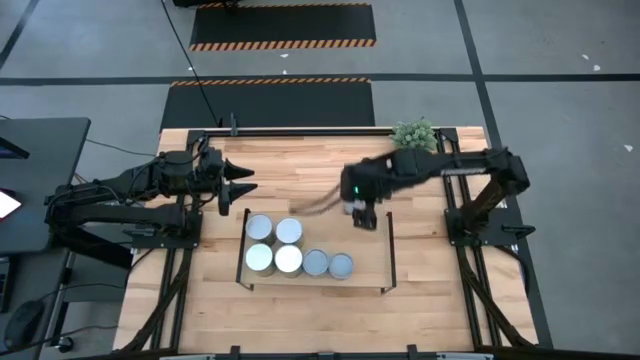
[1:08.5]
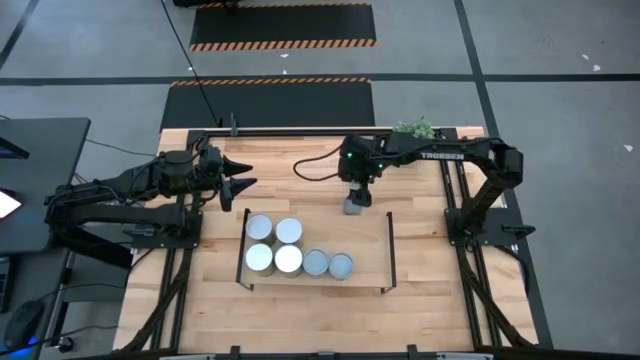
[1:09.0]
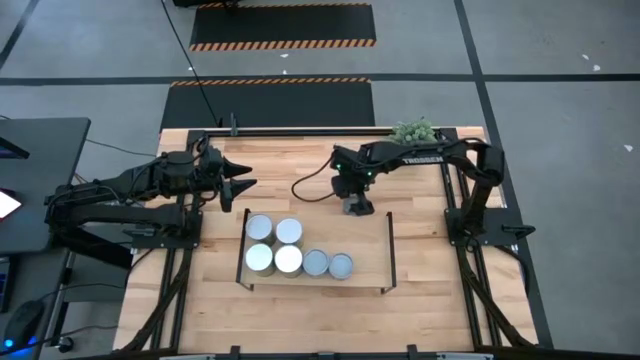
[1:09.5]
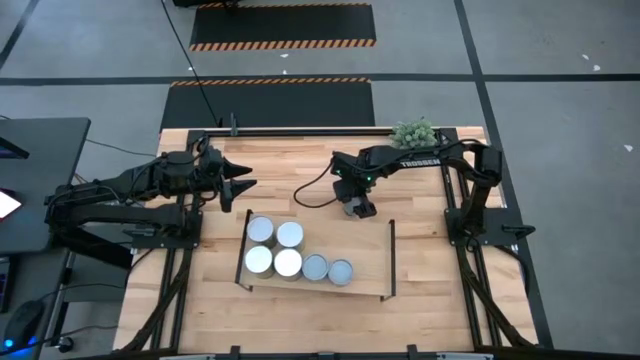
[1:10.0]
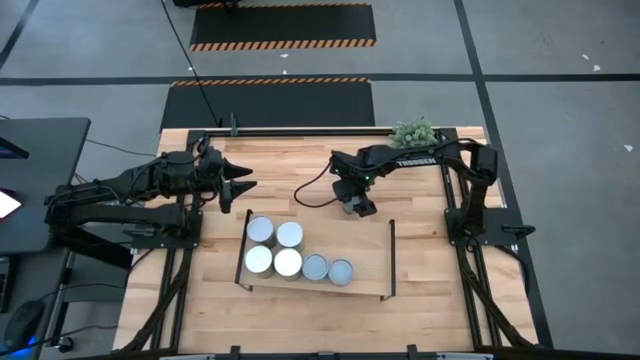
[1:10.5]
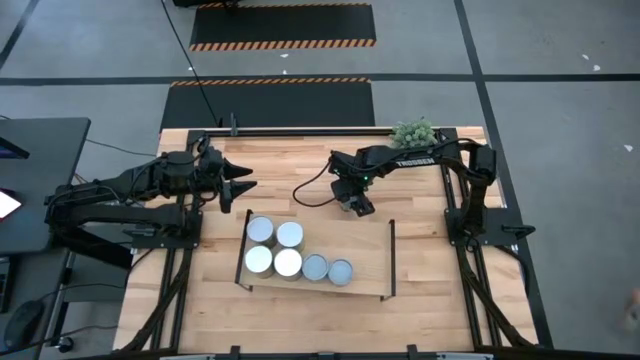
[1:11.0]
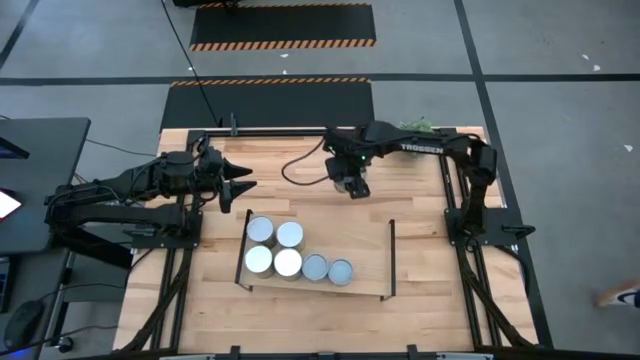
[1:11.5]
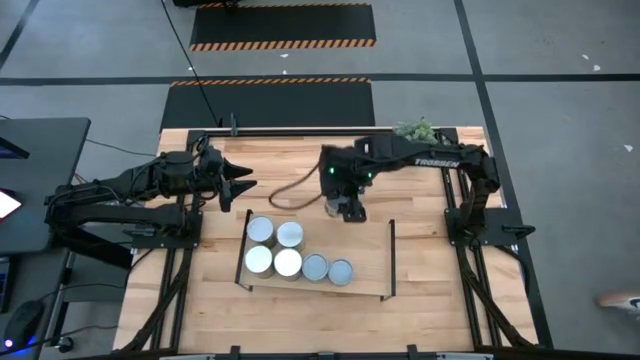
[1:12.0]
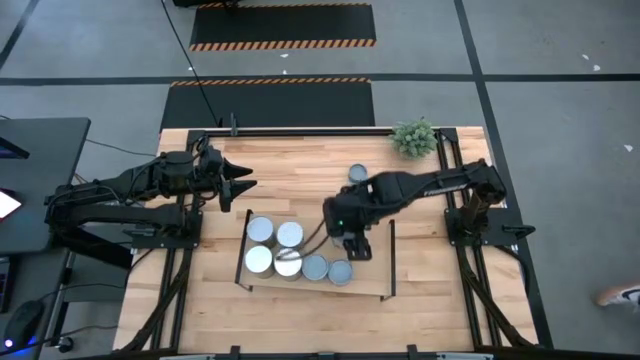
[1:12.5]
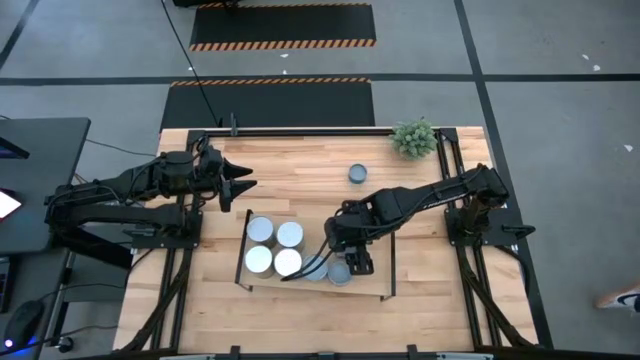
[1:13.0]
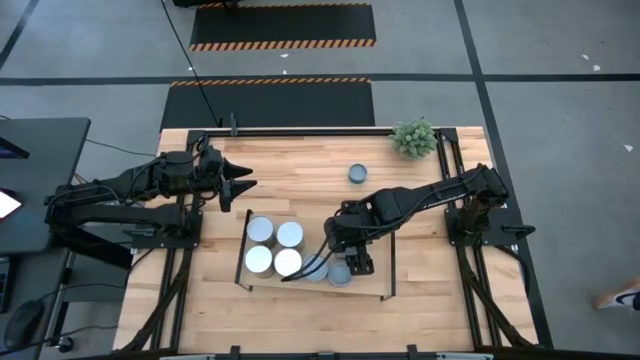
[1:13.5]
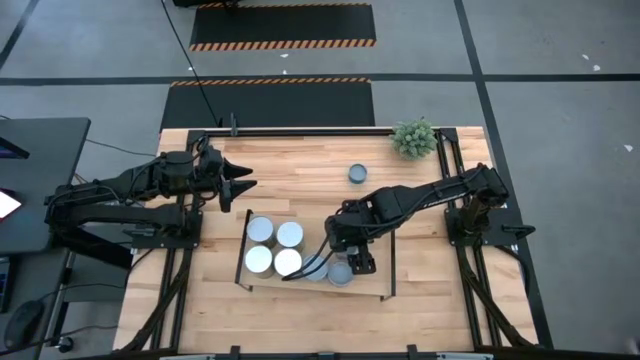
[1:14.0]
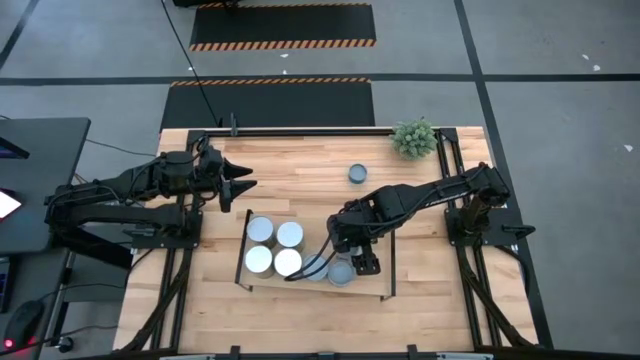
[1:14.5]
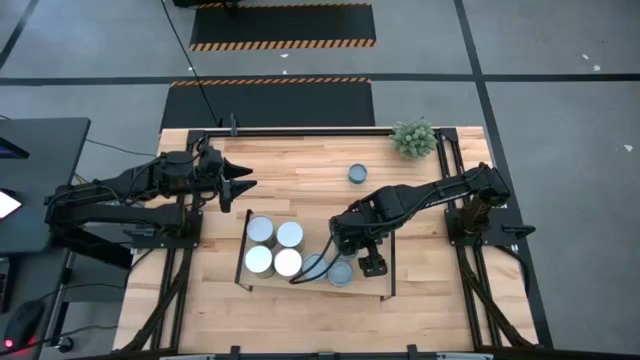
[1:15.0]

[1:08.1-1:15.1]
Task: Pick and place cans onto a shelf
Put the canned peas on the shelf

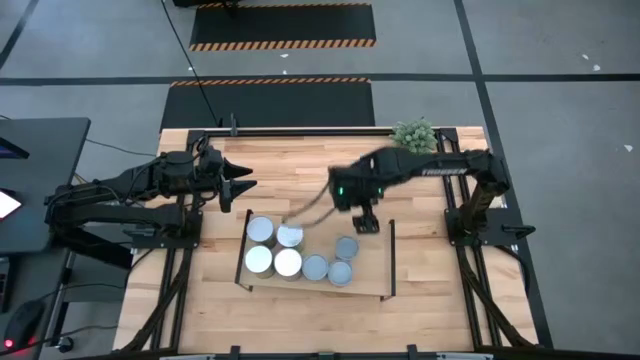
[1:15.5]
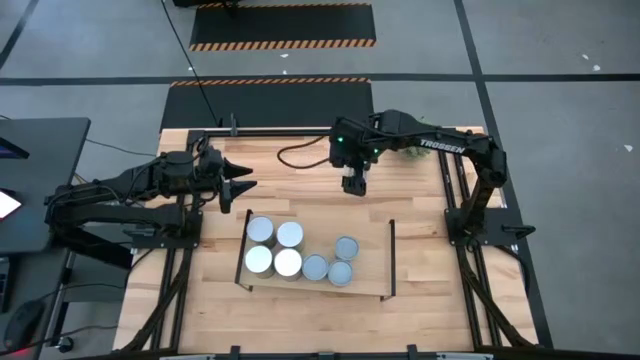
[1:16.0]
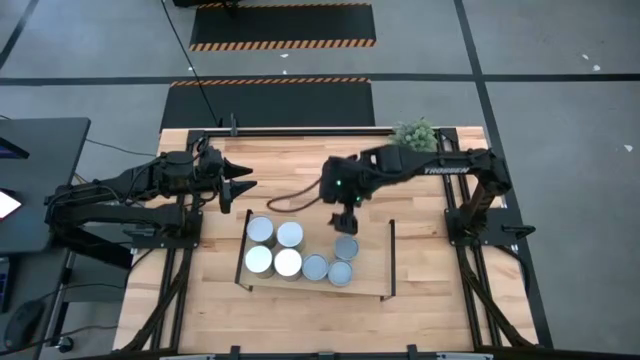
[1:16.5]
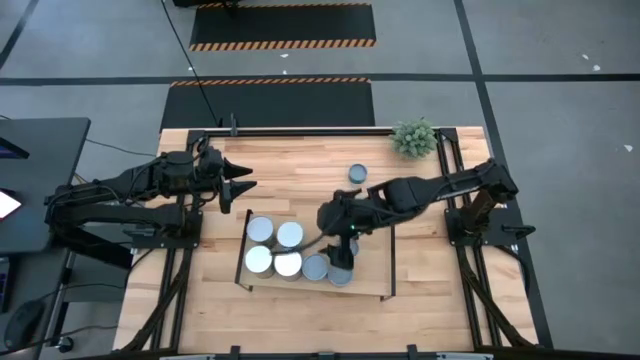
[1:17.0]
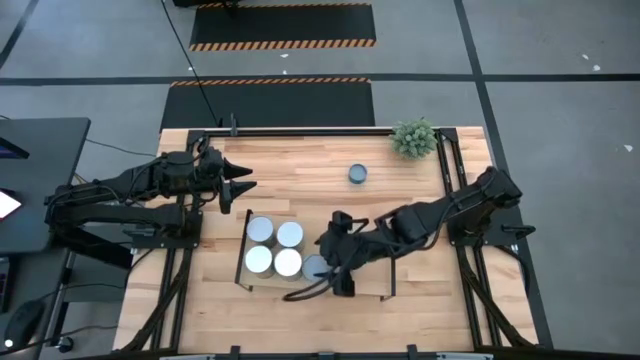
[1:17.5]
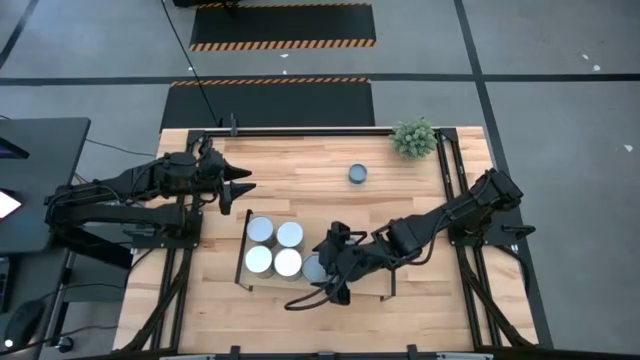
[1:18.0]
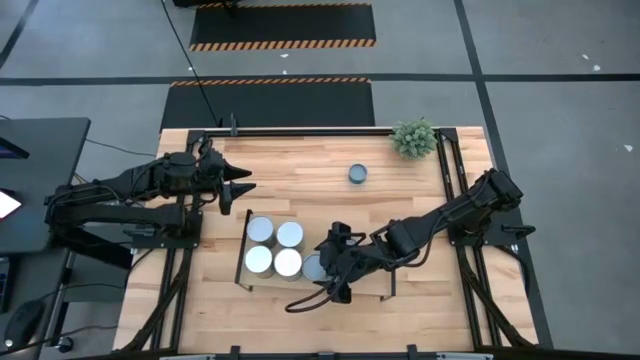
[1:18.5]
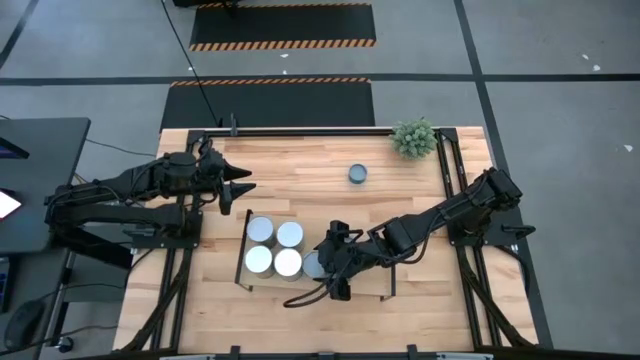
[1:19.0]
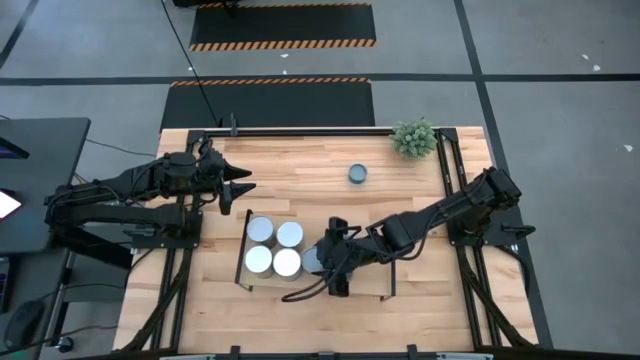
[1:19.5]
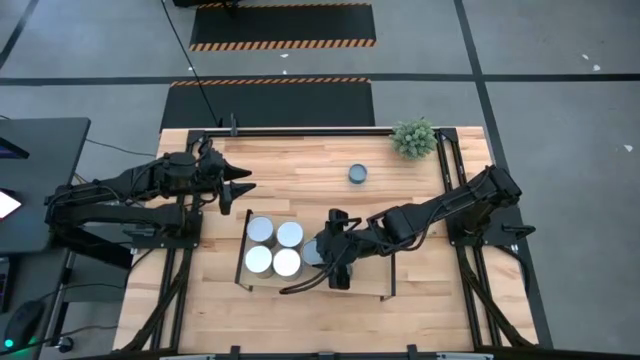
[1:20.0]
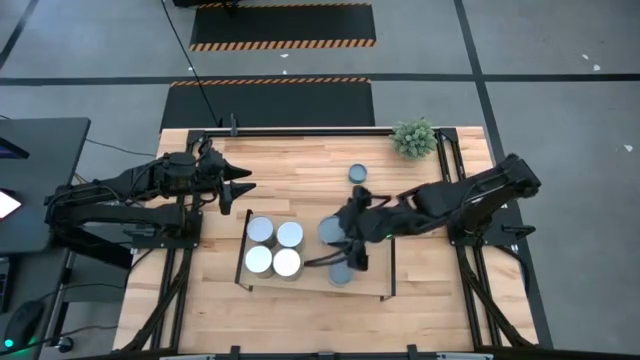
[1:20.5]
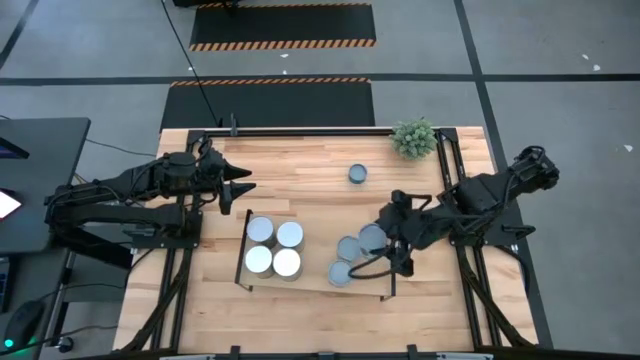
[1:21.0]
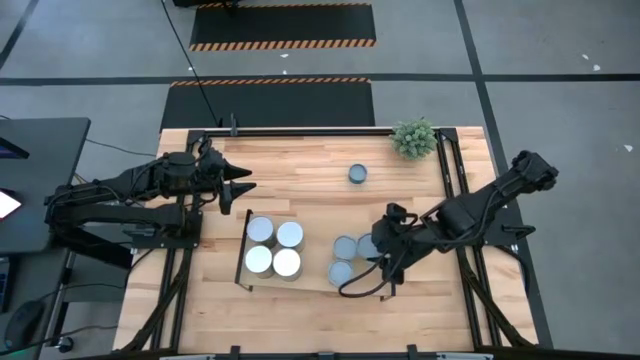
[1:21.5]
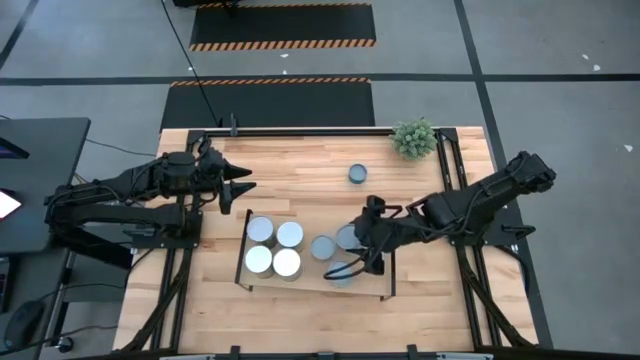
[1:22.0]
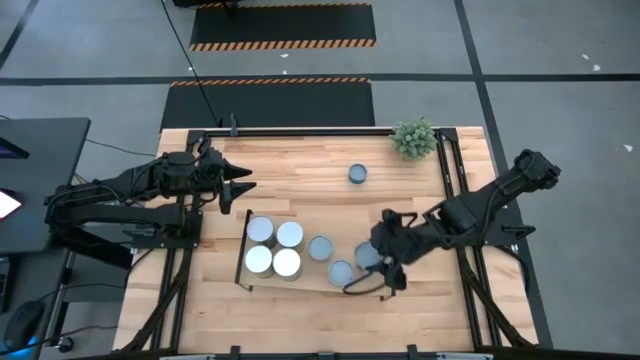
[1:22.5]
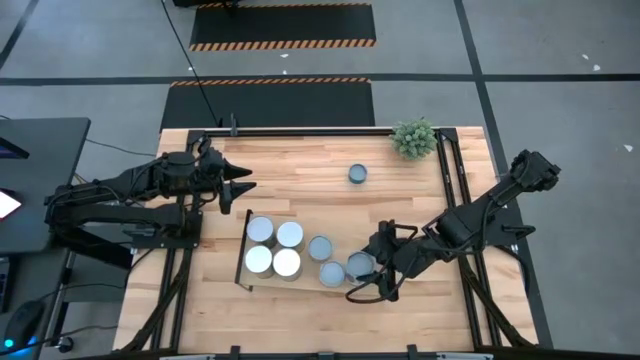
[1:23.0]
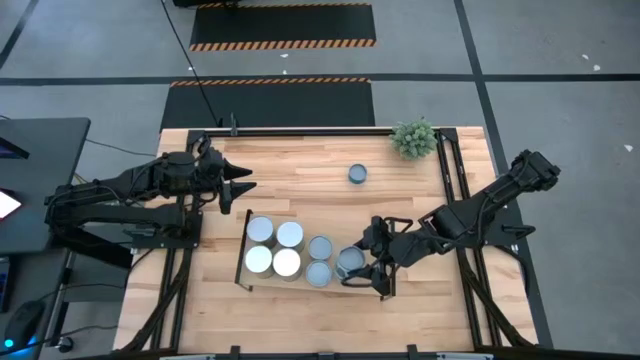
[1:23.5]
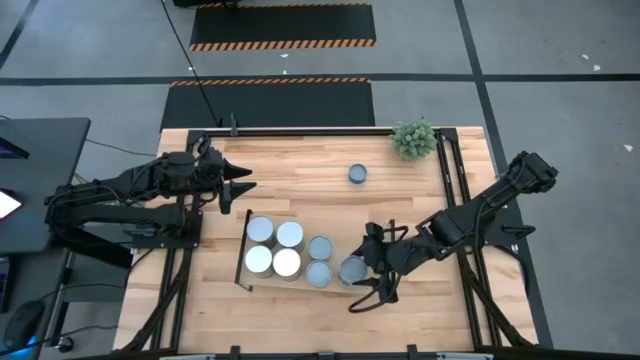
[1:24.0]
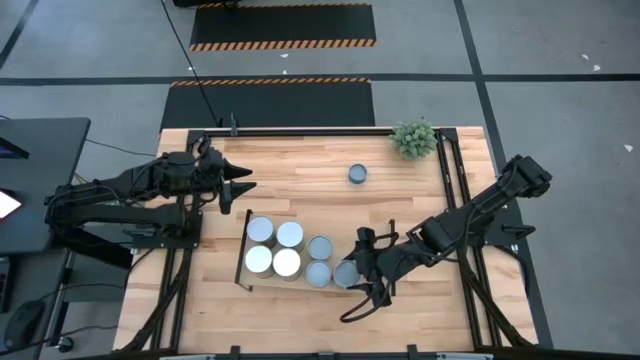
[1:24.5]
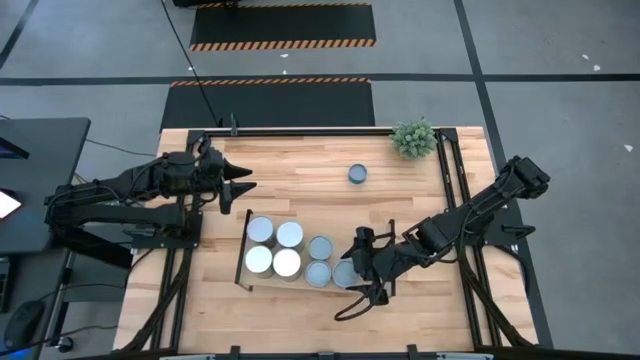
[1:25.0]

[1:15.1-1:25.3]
Adjust the canned mixed vegetables on the shelf
